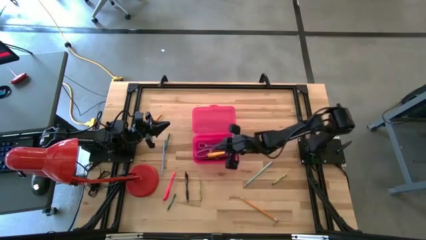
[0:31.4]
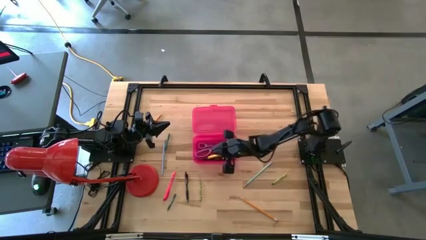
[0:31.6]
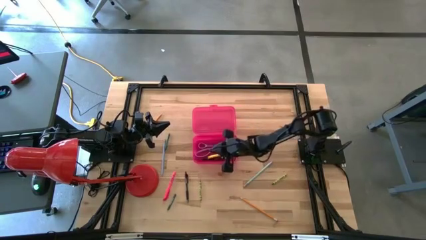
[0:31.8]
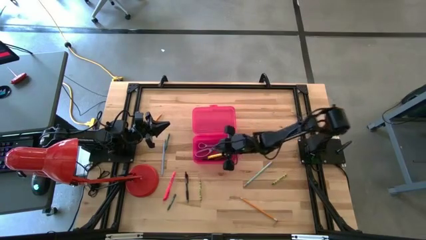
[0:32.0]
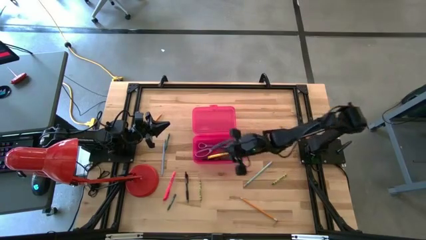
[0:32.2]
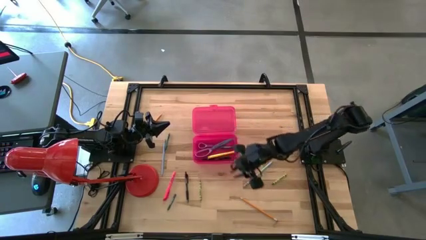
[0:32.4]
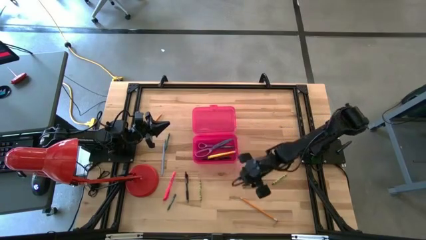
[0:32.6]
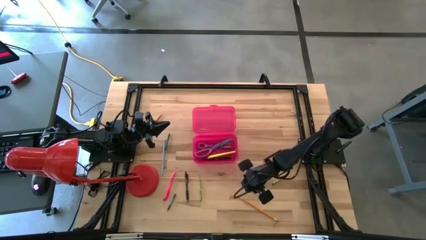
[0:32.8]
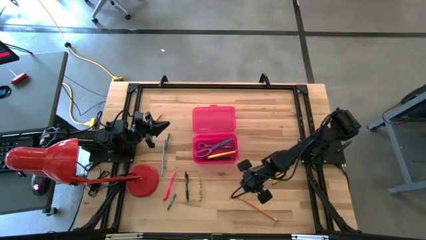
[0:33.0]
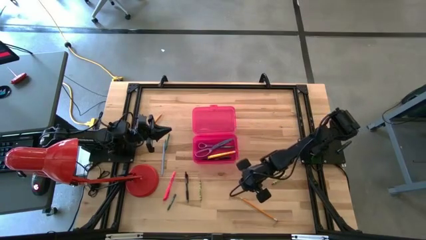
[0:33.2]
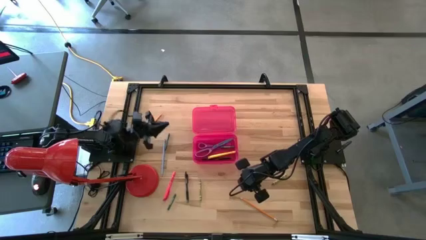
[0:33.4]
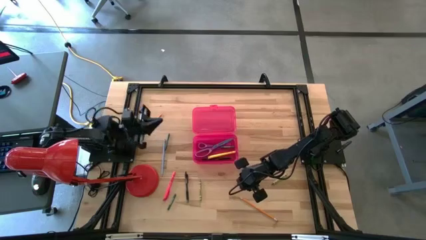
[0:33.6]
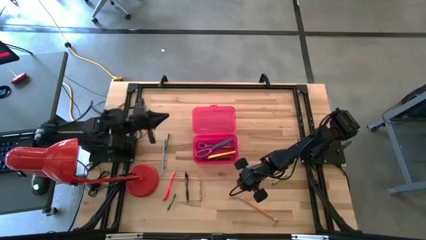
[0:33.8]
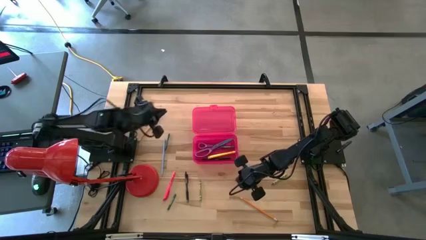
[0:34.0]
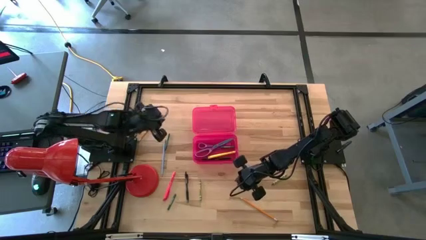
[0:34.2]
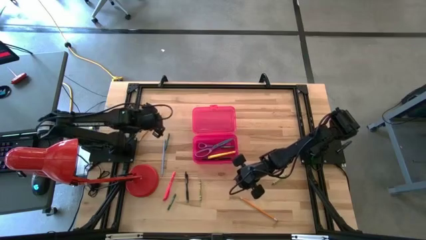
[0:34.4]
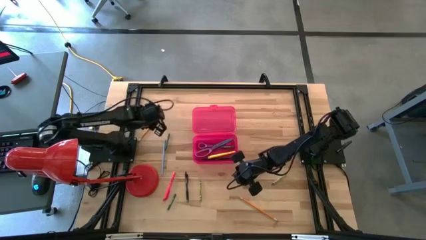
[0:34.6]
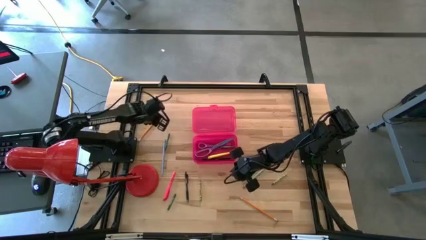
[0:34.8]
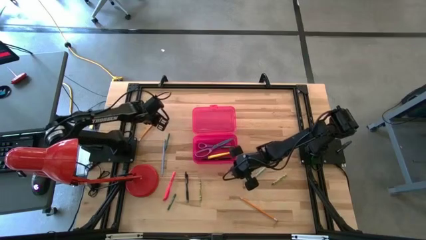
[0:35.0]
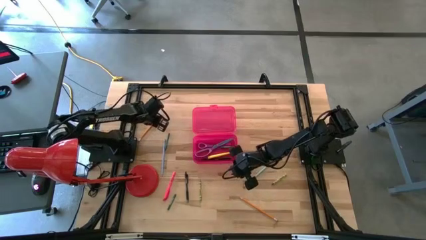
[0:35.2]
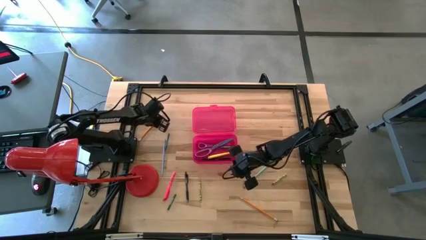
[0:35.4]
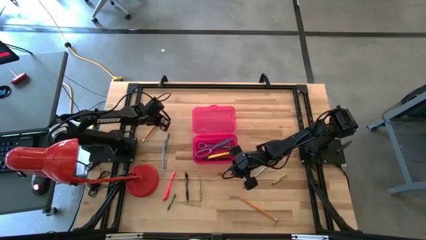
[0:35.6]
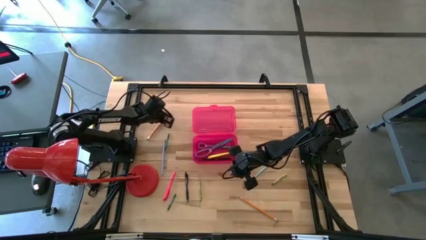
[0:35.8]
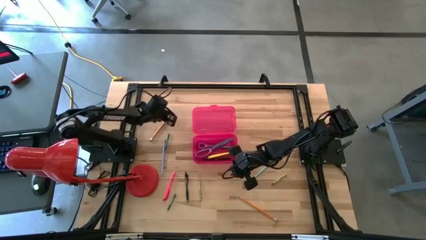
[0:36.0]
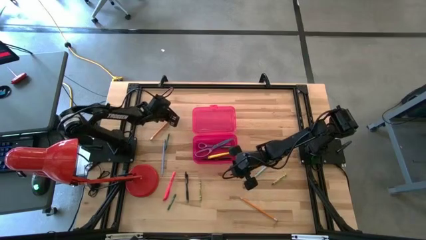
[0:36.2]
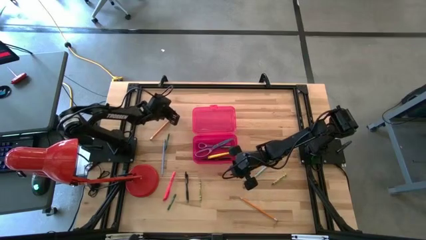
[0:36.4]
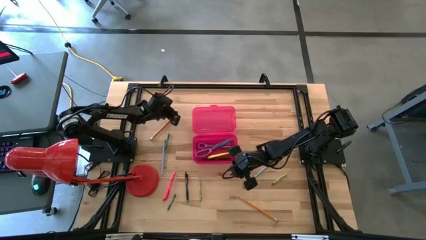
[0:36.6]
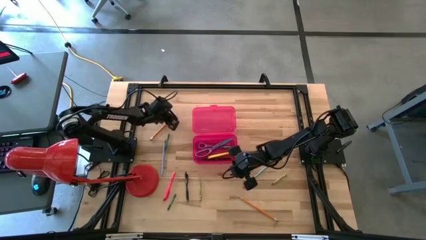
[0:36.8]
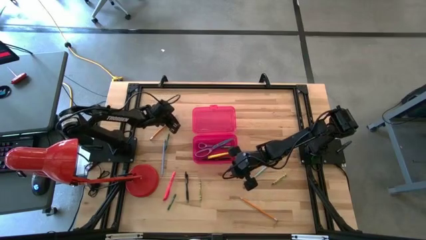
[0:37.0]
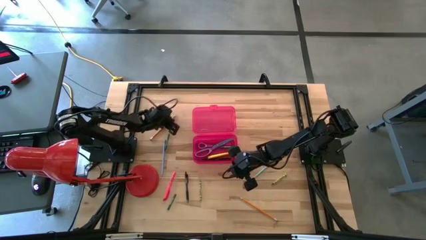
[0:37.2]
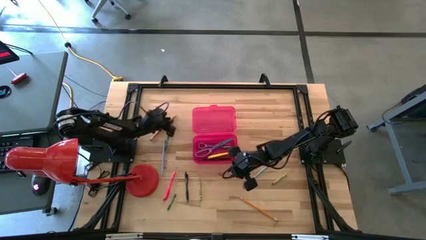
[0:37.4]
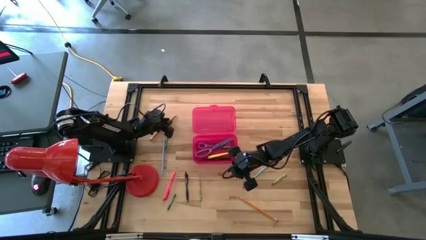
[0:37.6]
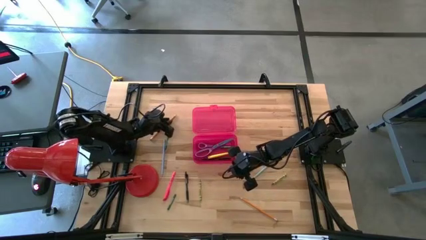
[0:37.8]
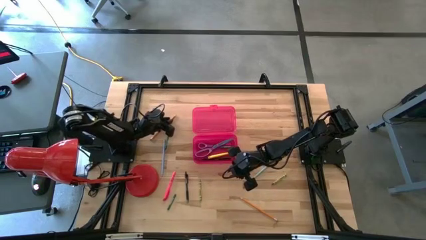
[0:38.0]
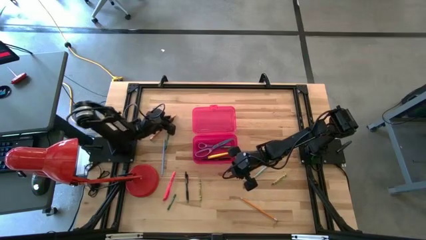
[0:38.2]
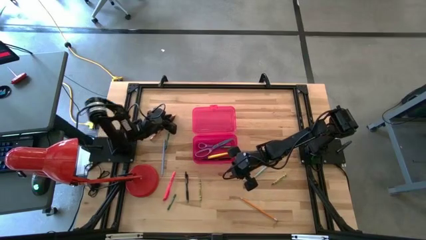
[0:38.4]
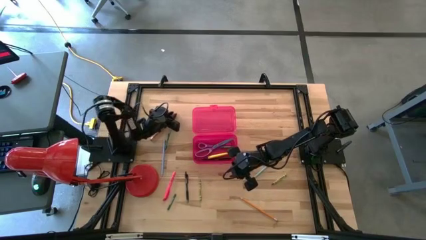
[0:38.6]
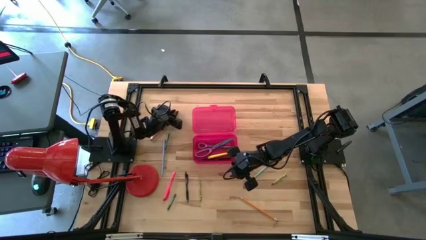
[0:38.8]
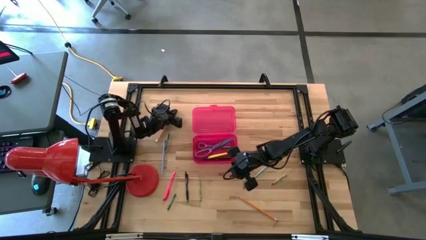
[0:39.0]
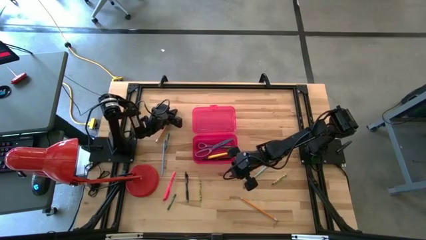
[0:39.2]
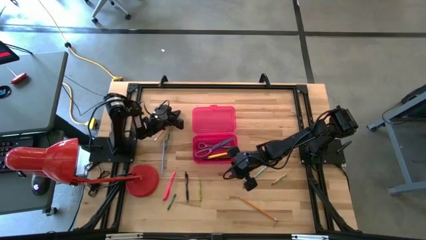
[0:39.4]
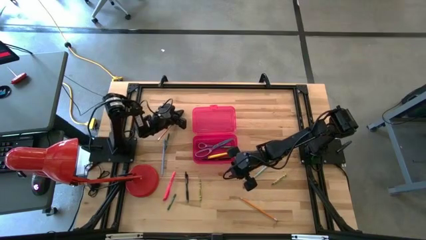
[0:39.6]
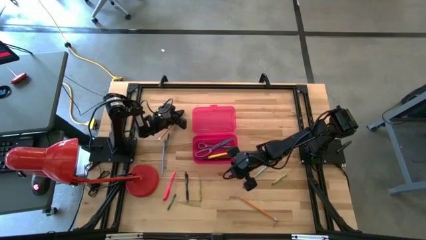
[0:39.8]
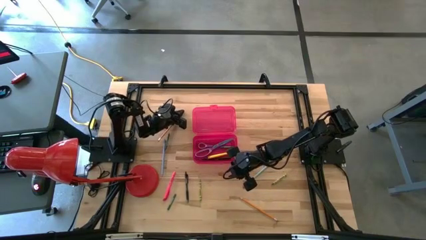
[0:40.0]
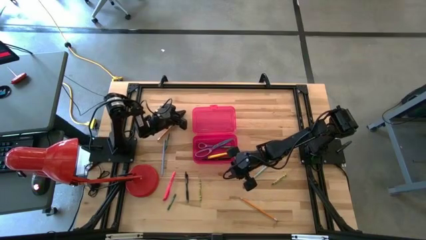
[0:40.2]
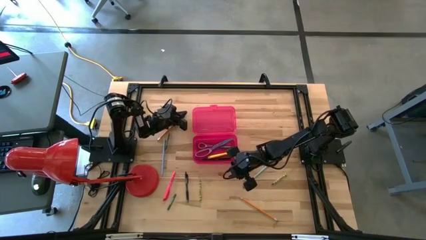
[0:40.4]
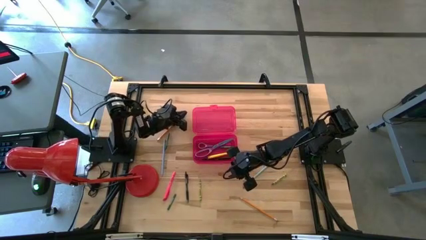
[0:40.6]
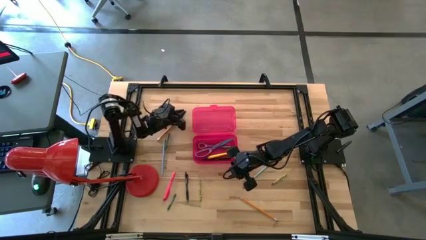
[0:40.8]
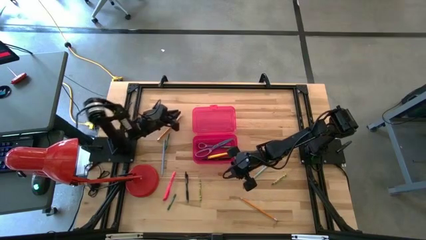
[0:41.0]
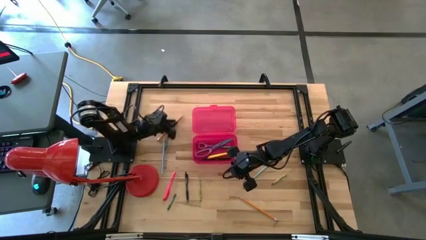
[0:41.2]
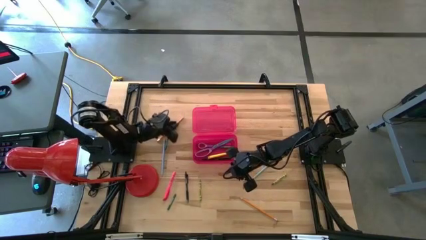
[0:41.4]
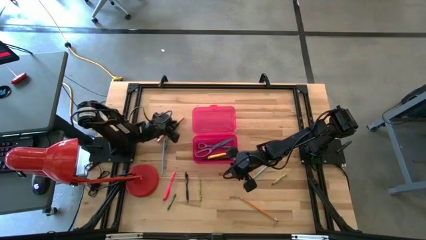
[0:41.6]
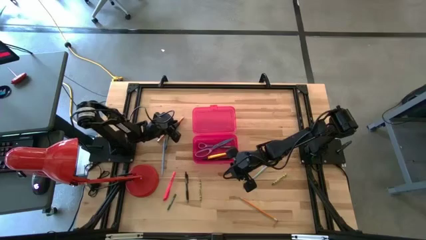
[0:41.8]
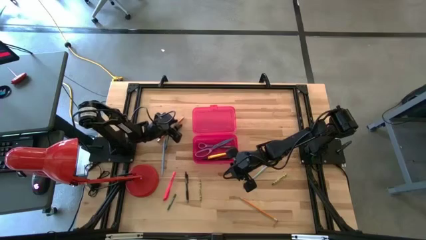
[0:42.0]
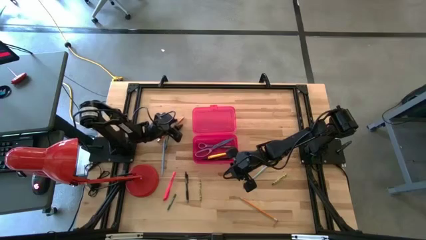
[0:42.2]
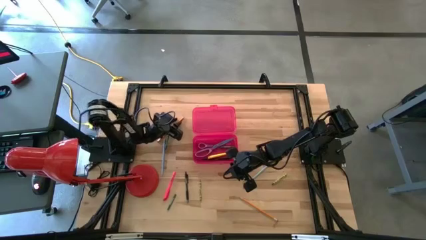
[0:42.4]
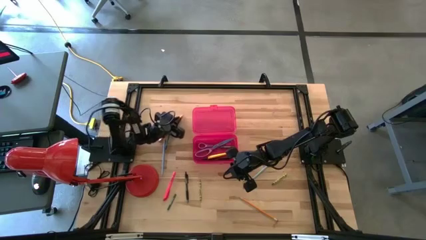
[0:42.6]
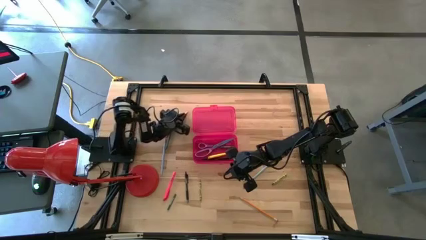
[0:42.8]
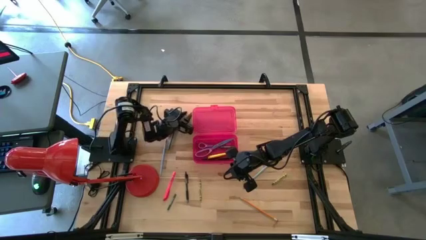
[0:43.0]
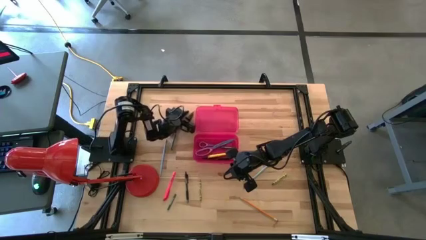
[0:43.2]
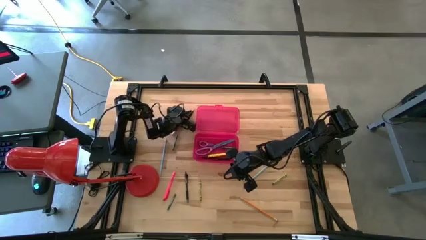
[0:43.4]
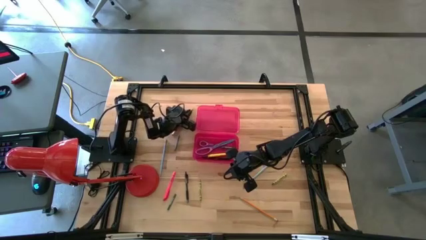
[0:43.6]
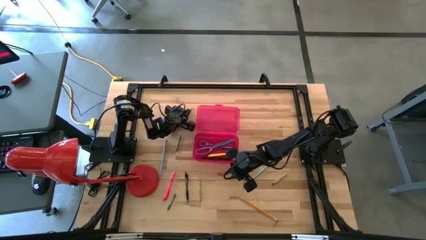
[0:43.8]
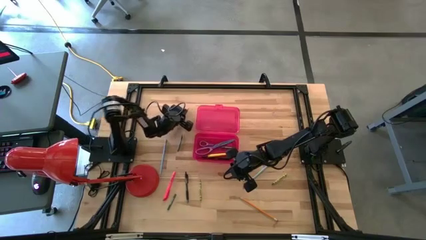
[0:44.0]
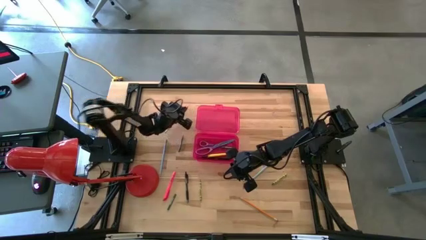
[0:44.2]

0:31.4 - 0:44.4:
Task: Pick & place school supplies into a supply box
Put the top orange pencil into the pink supply box

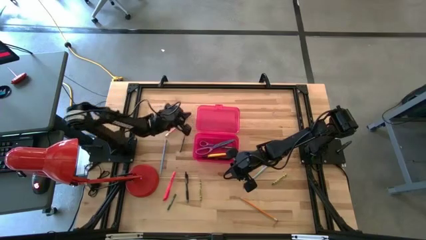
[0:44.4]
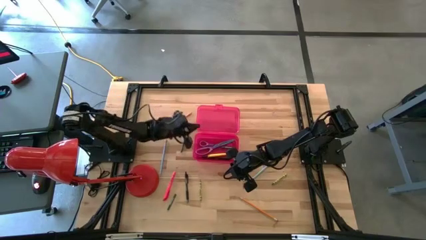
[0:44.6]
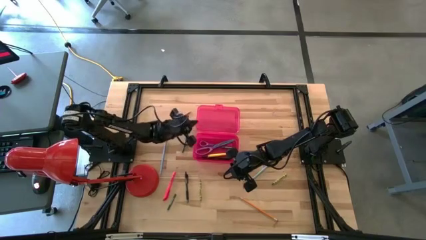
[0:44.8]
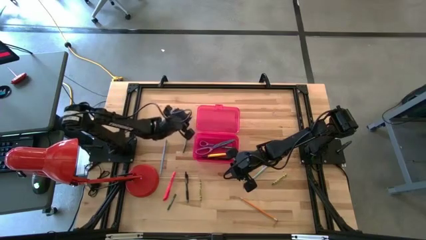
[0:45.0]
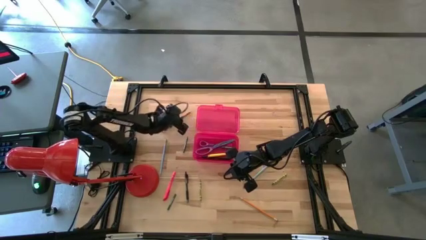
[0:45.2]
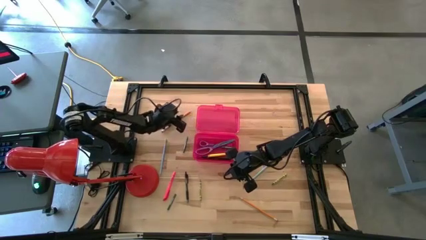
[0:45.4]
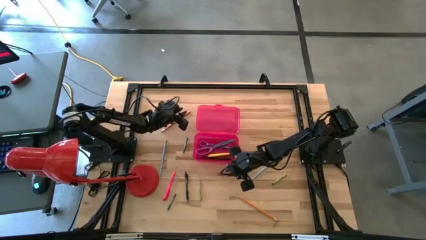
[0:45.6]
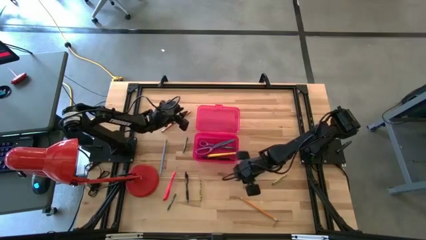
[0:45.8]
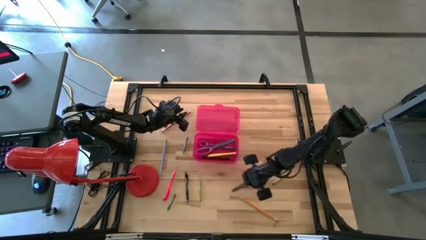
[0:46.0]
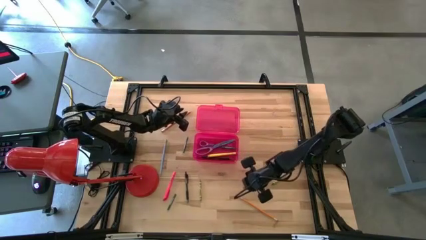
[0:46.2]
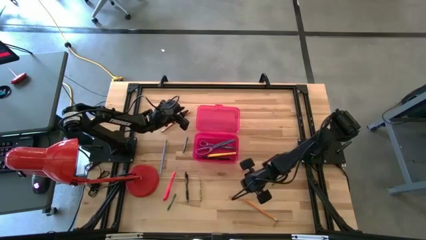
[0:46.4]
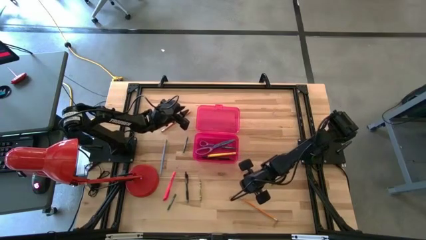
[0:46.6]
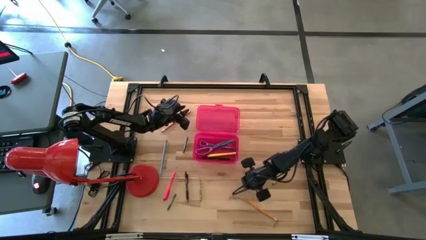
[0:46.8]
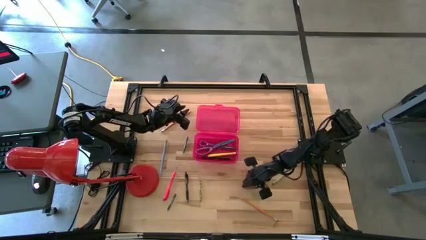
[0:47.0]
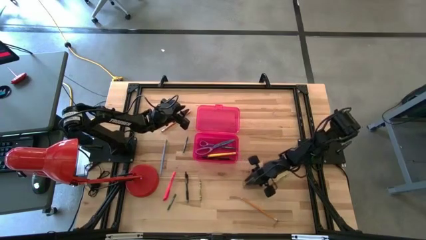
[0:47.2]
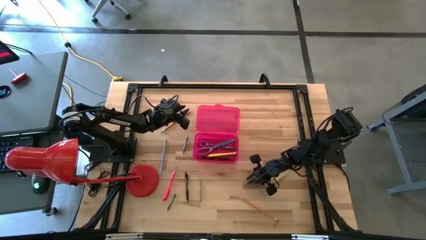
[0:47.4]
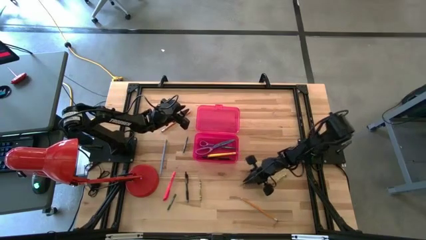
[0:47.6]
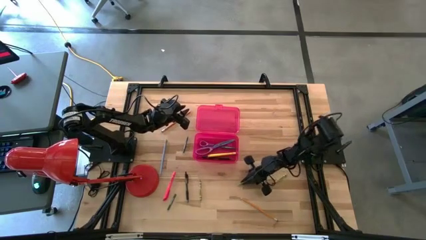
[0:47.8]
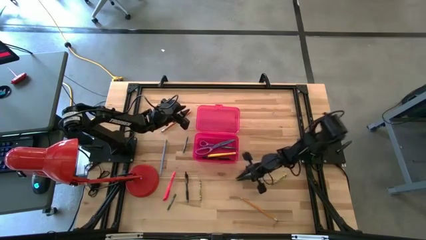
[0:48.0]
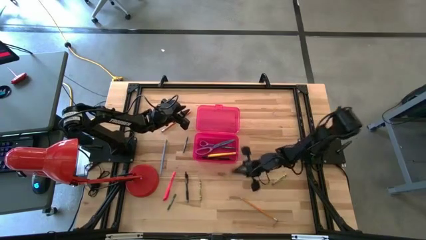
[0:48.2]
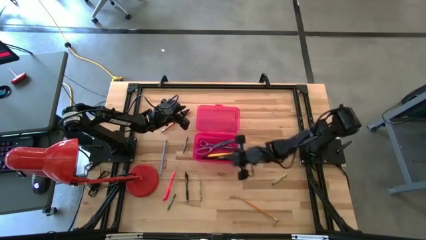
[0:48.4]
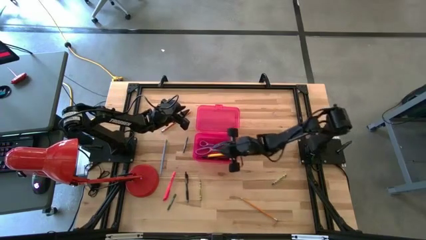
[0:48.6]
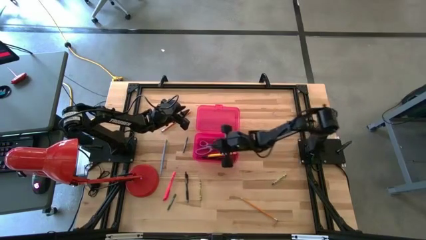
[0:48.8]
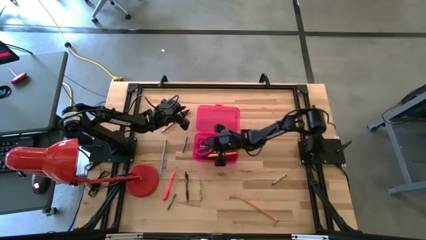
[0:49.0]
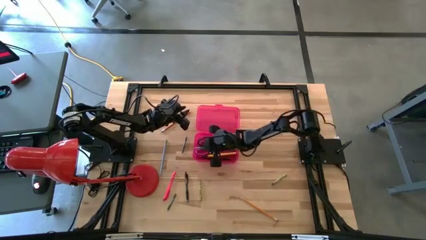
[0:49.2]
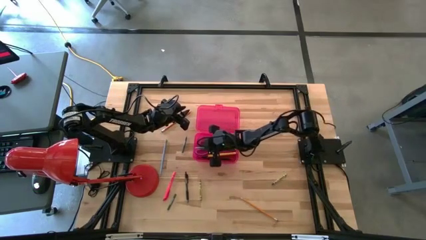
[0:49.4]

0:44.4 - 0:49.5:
Put the light green pencil into the pink supply box
